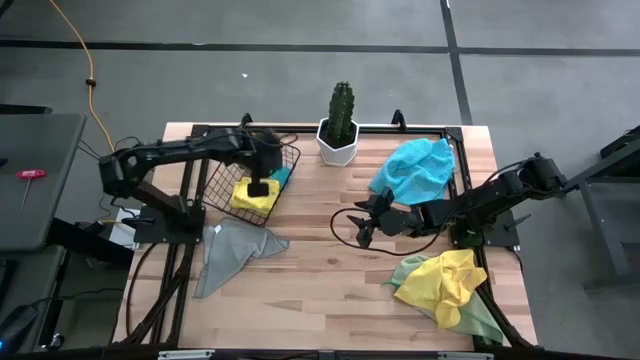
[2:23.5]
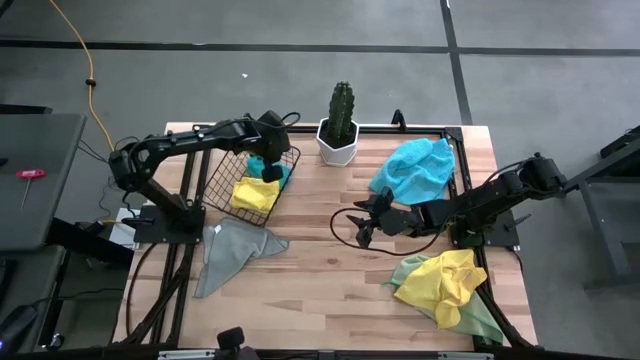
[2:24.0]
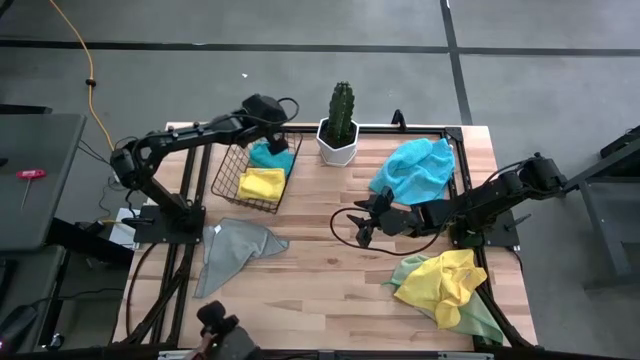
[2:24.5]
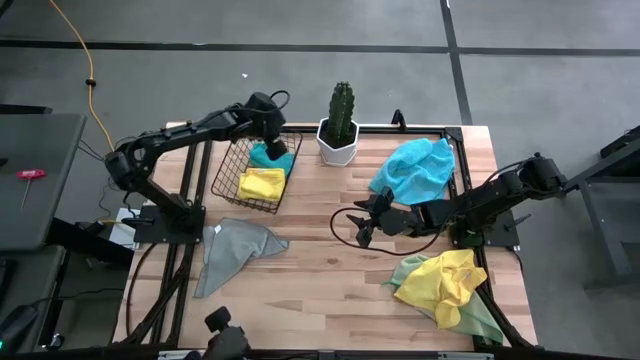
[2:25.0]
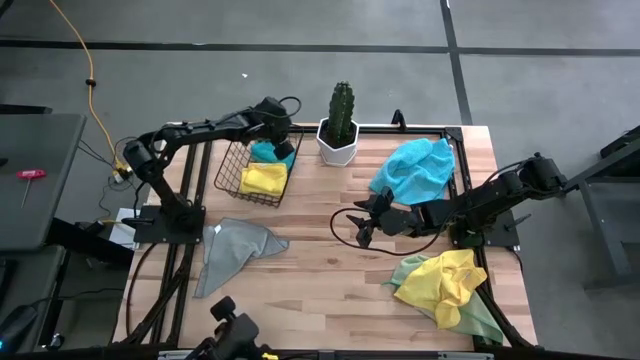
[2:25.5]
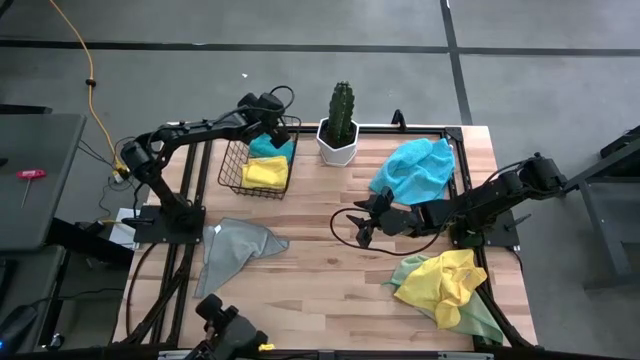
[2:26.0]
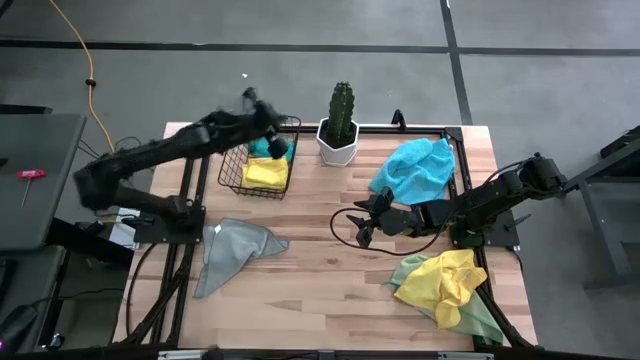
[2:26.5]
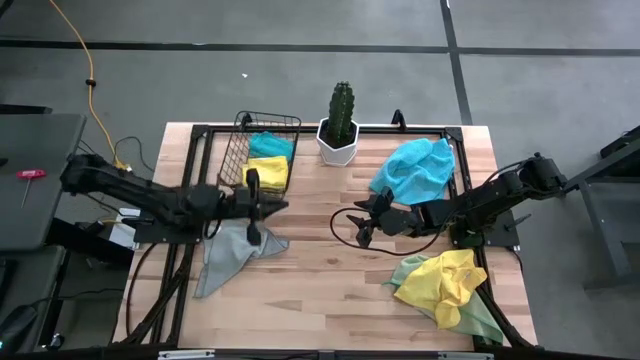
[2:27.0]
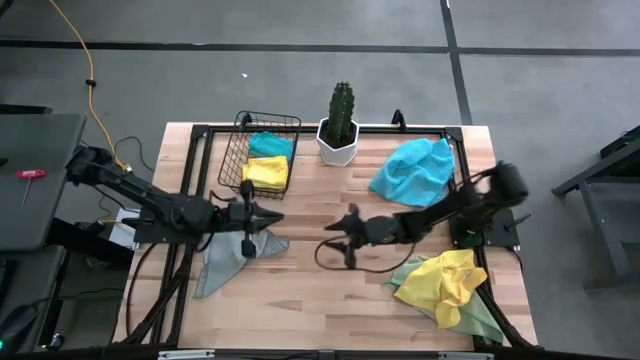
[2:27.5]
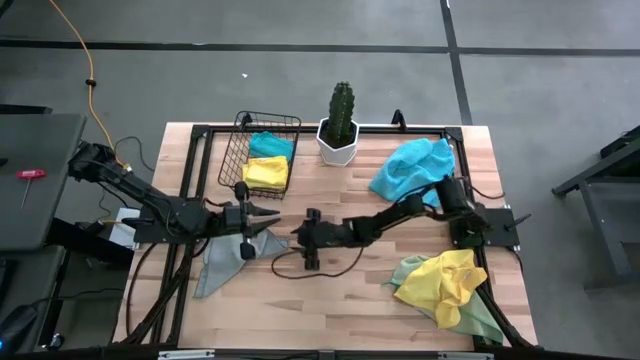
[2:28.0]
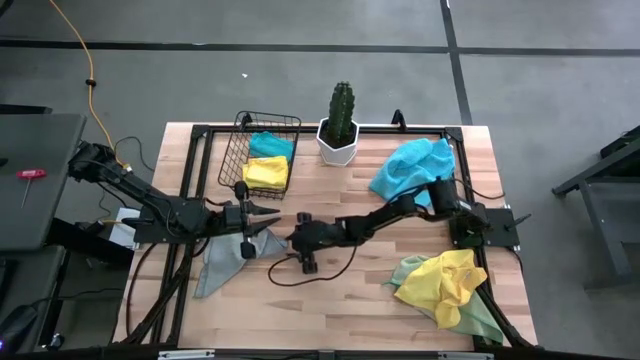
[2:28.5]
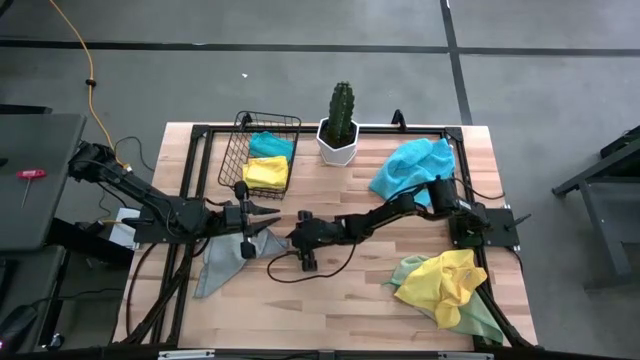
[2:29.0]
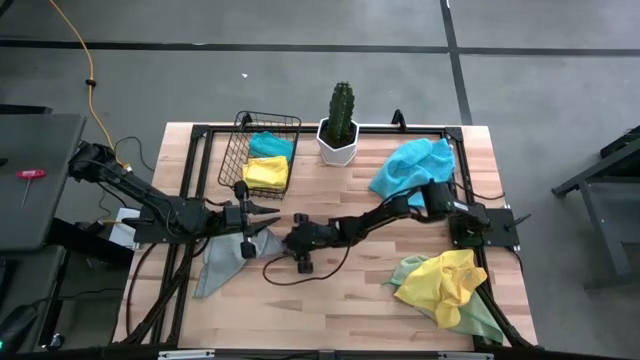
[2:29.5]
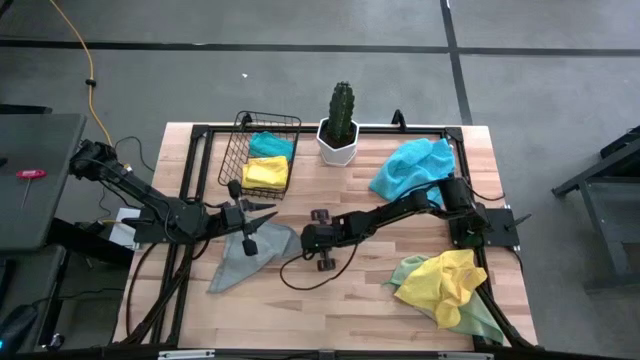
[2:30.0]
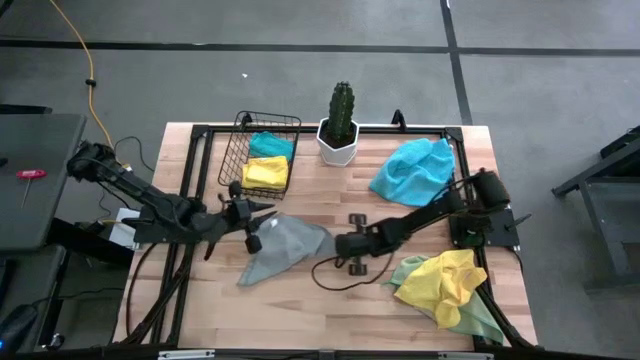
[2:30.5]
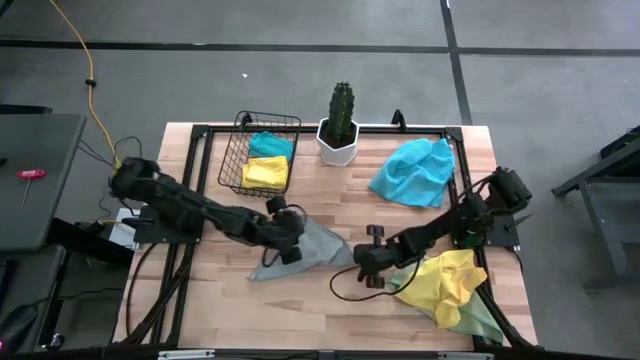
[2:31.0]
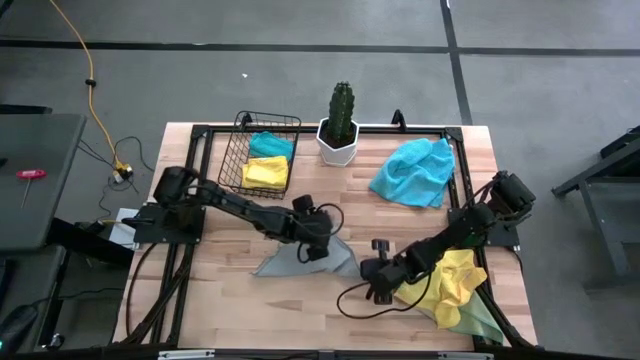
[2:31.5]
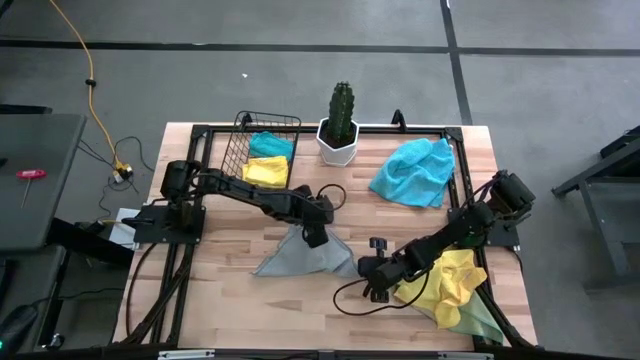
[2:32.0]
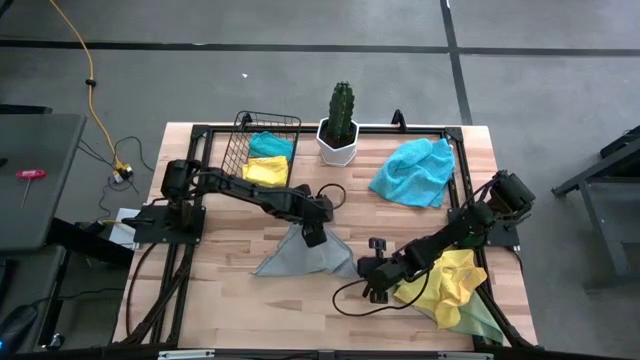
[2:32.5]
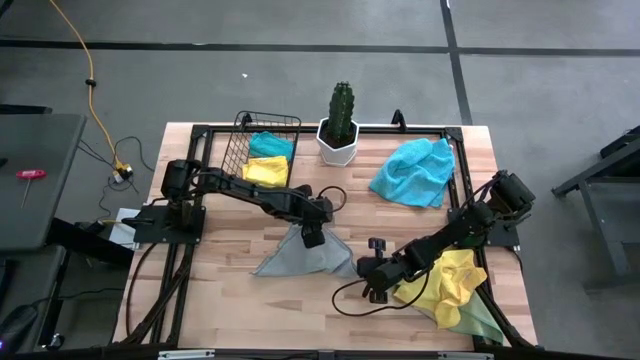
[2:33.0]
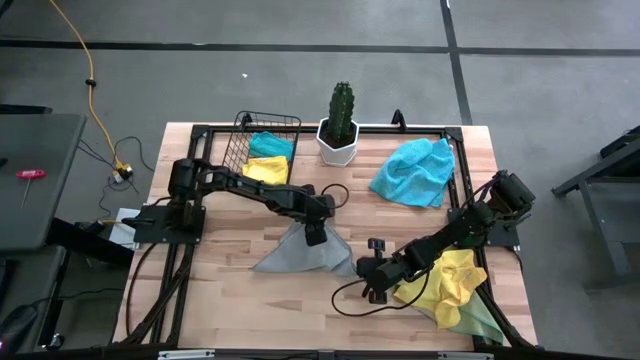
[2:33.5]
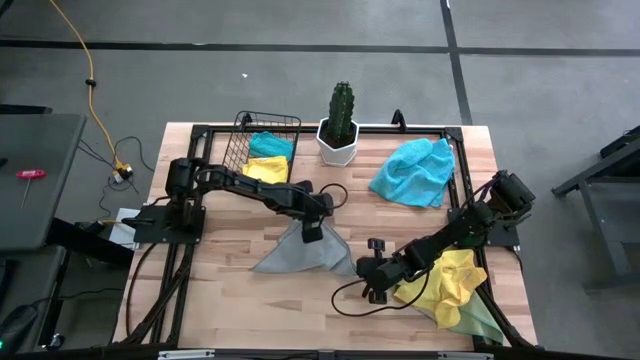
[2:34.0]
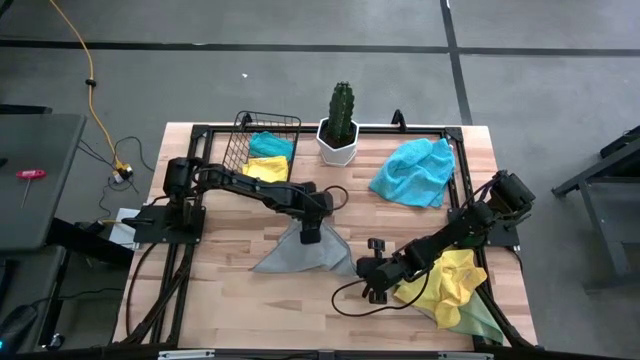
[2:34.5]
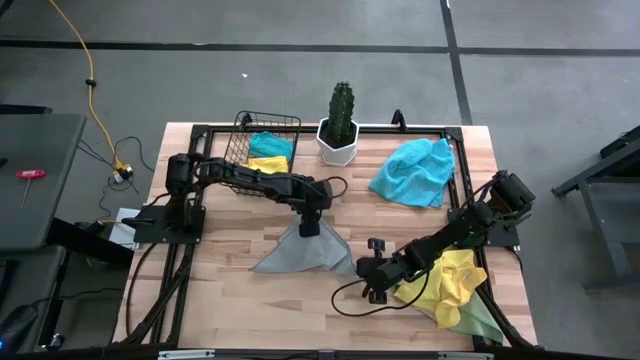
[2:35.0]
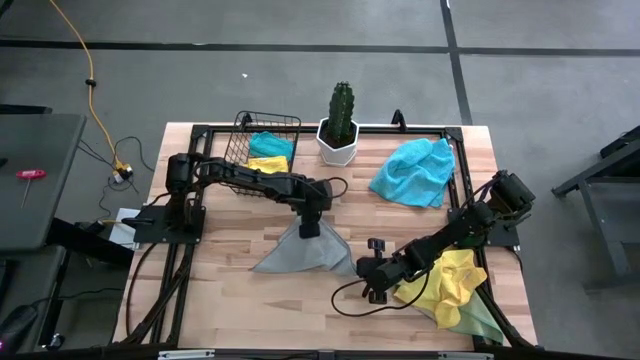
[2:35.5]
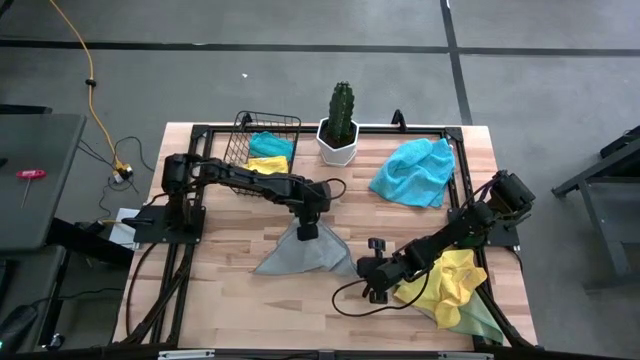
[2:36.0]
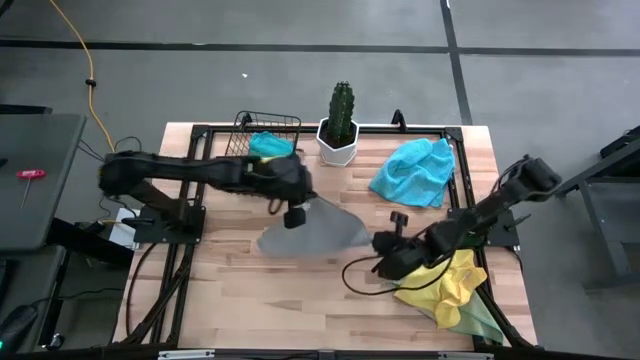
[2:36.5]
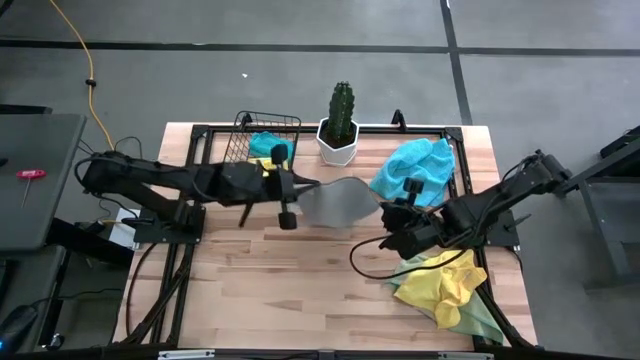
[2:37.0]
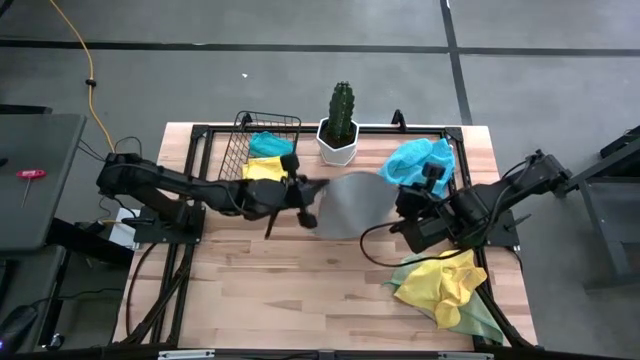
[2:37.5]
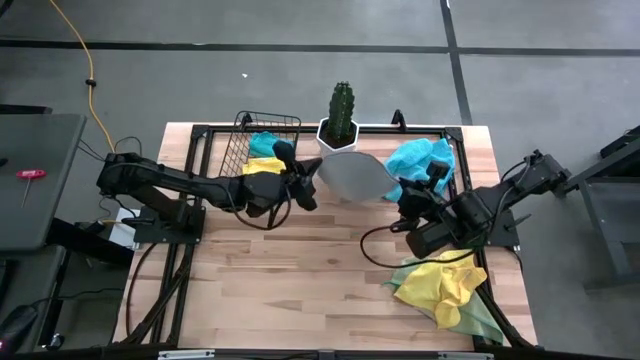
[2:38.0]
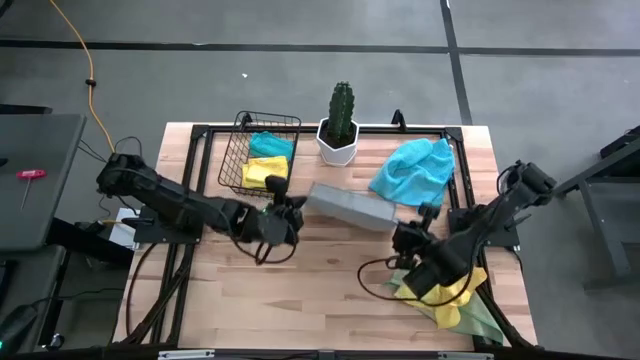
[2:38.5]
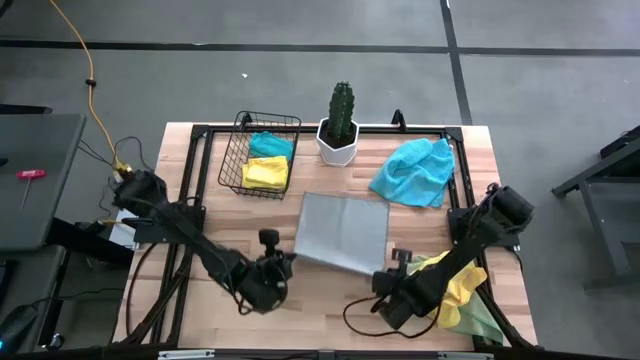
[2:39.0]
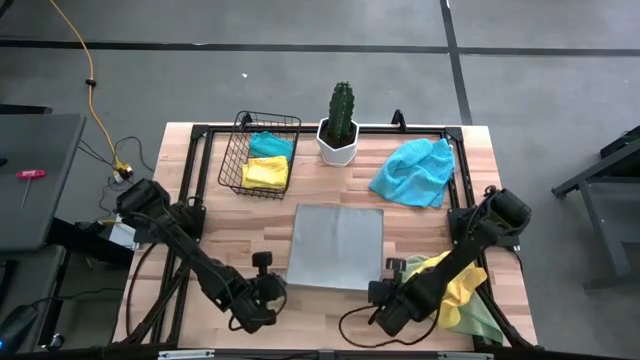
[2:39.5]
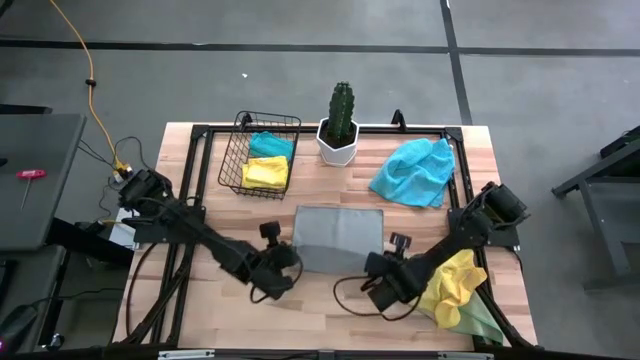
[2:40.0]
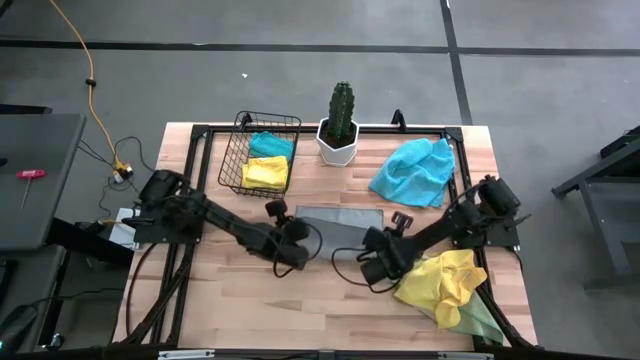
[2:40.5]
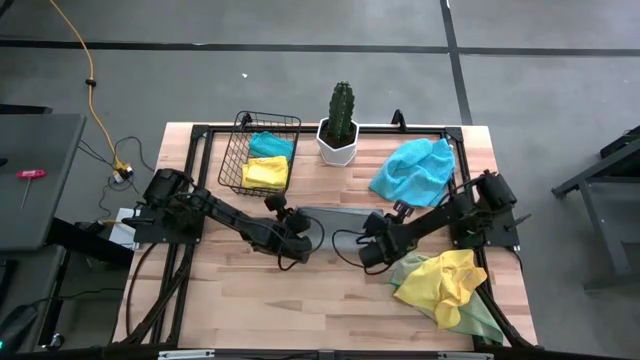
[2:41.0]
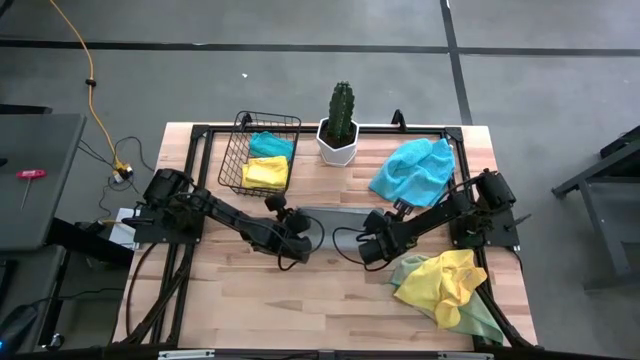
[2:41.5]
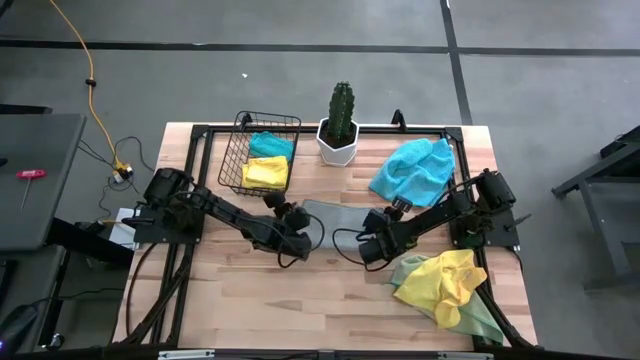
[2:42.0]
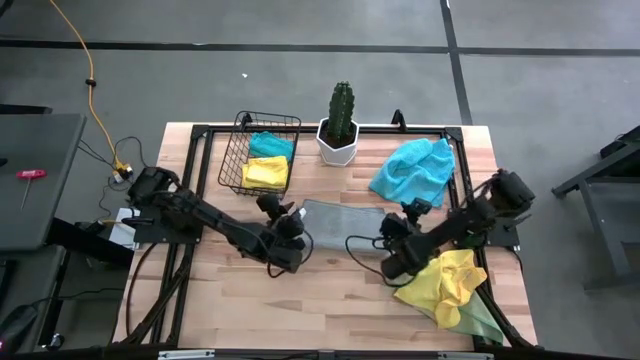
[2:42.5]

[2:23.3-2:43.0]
Task: Fold microfiber towels
Fold the gray microfiber towel on the table

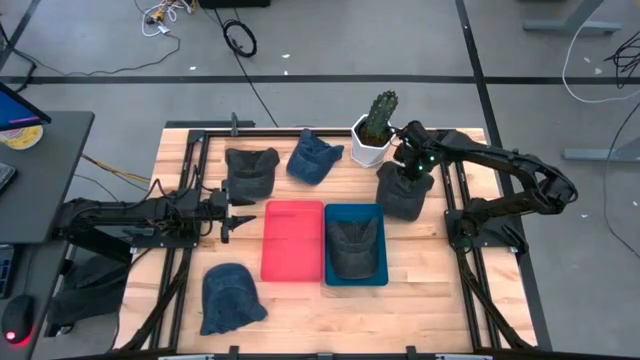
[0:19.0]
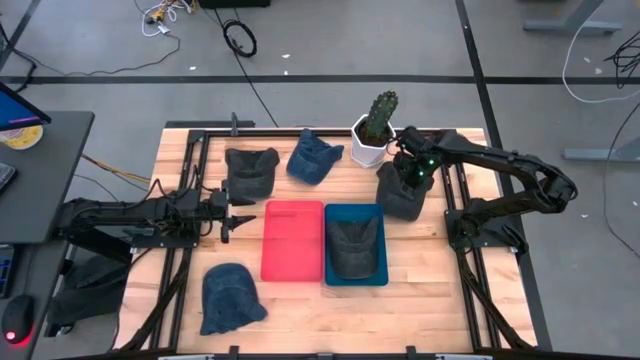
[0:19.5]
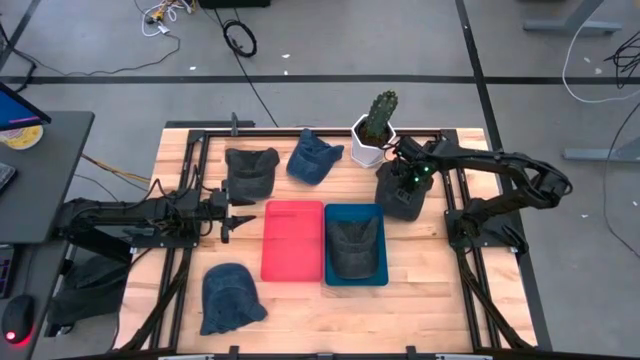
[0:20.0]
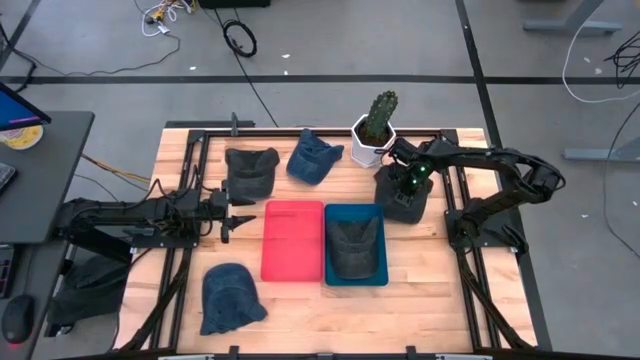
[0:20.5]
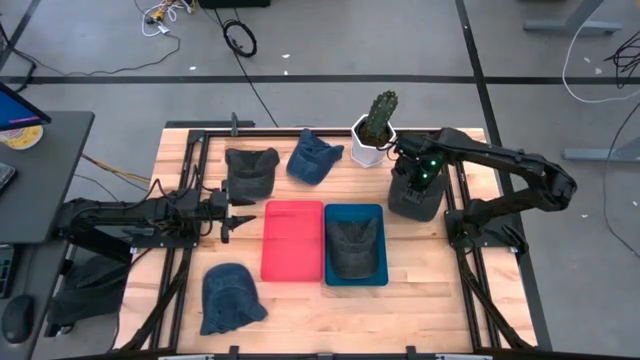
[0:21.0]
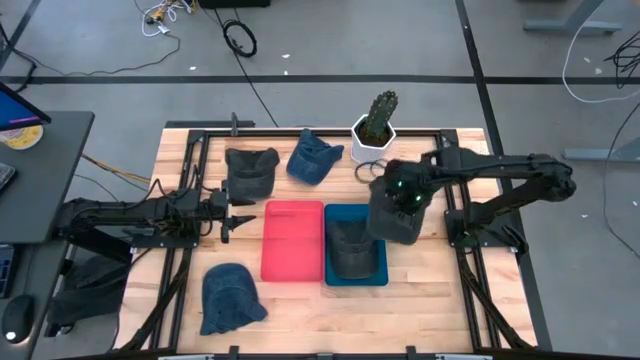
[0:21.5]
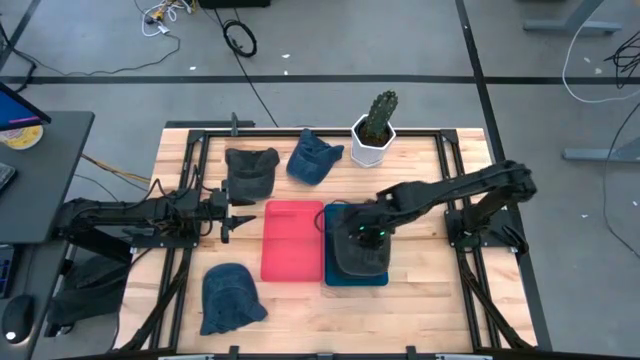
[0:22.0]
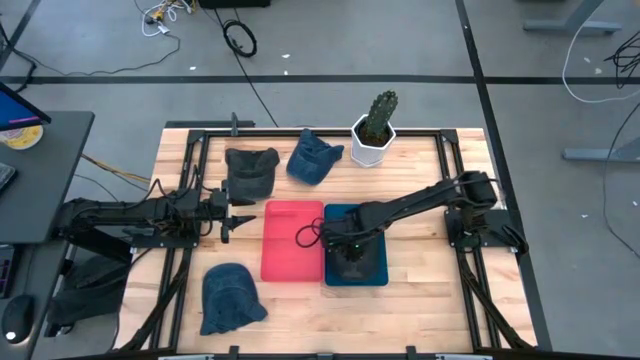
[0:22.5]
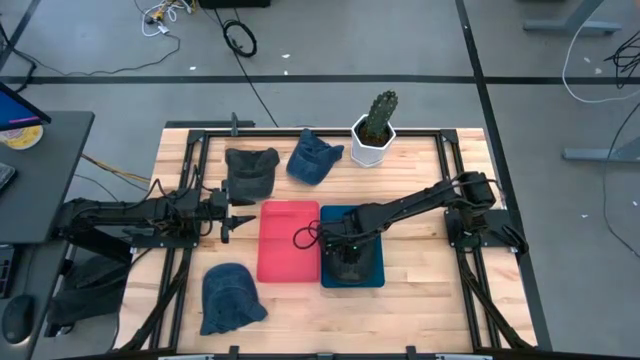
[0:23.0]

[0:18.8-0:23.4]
Task: Pick & Place hat
Put the right black cap into the blue bin
